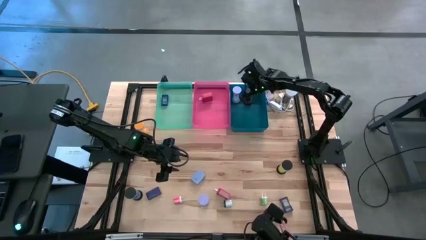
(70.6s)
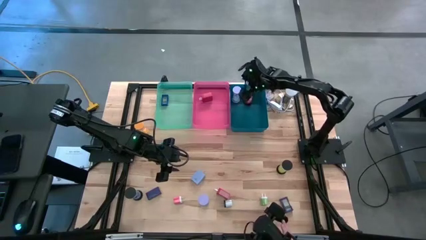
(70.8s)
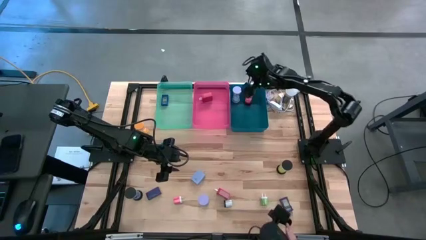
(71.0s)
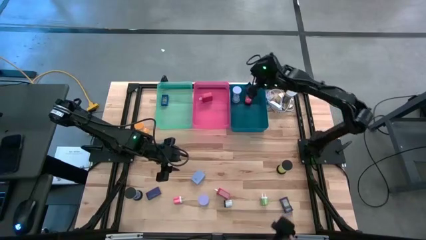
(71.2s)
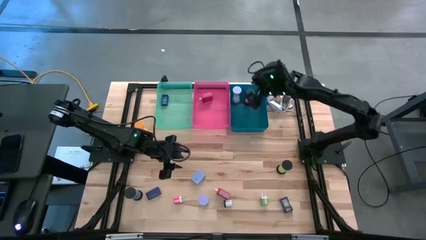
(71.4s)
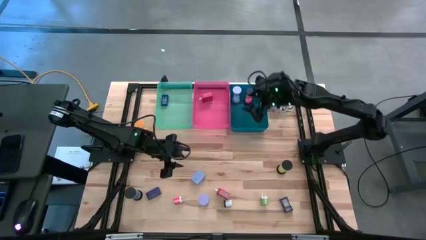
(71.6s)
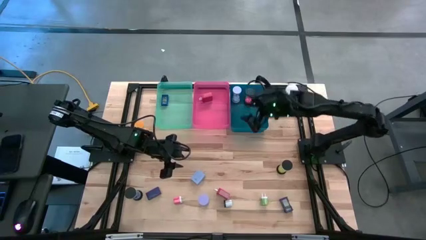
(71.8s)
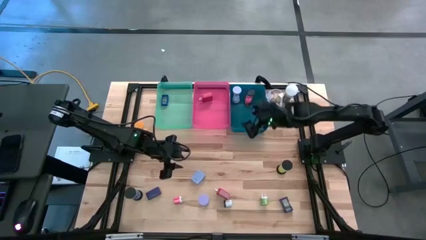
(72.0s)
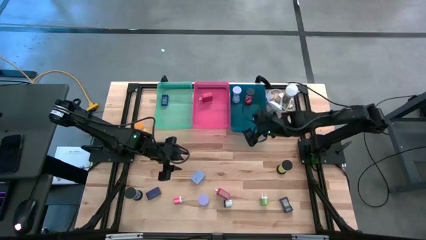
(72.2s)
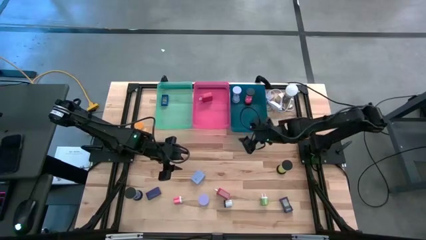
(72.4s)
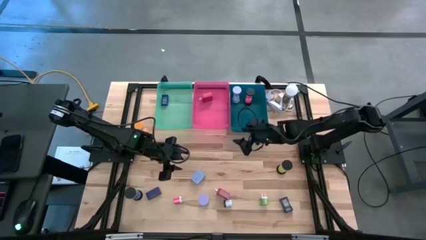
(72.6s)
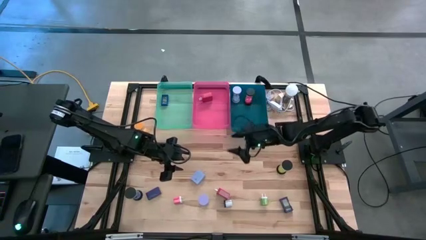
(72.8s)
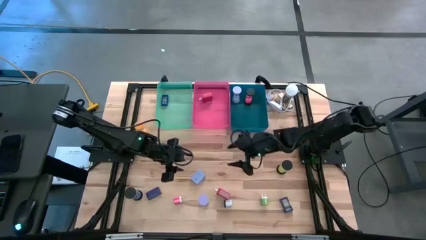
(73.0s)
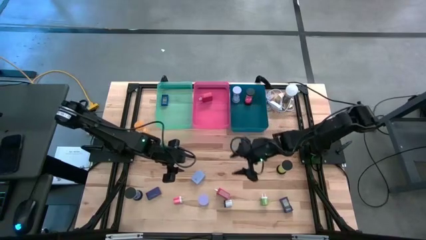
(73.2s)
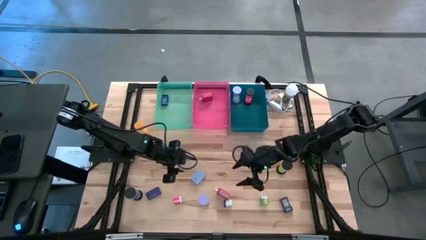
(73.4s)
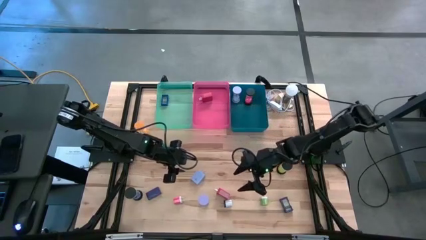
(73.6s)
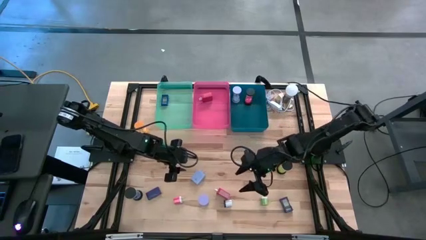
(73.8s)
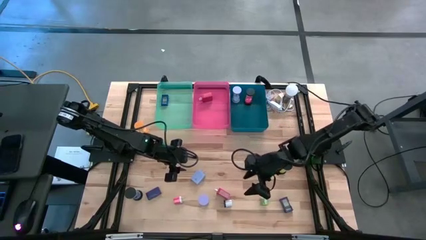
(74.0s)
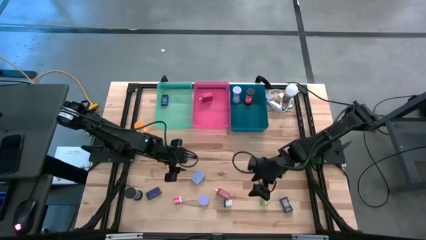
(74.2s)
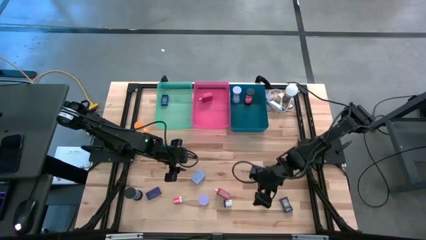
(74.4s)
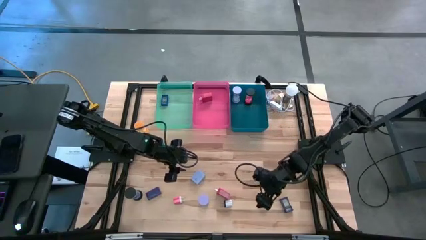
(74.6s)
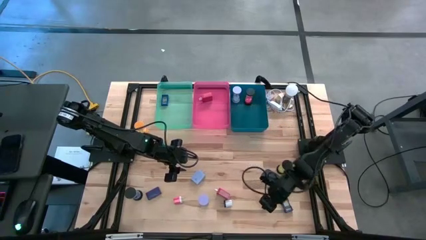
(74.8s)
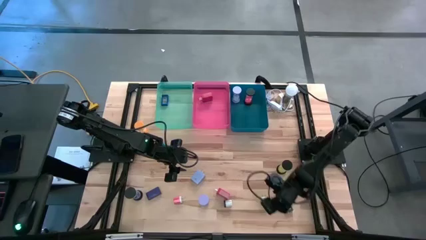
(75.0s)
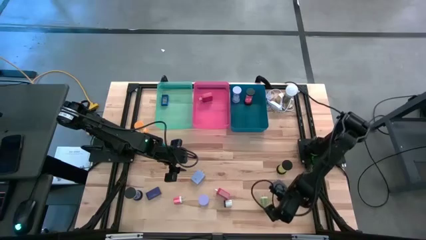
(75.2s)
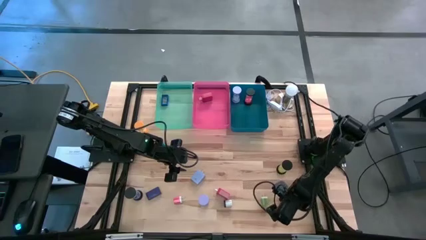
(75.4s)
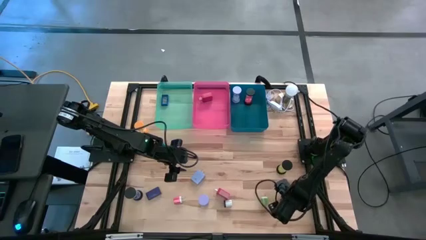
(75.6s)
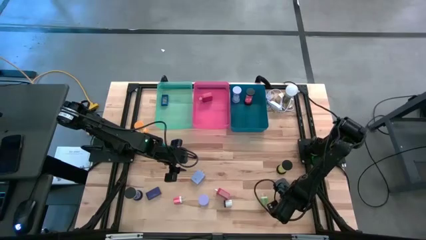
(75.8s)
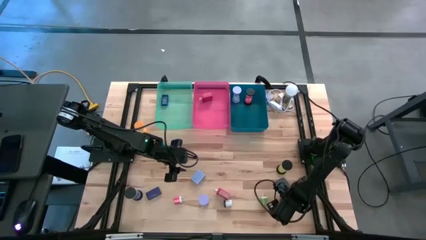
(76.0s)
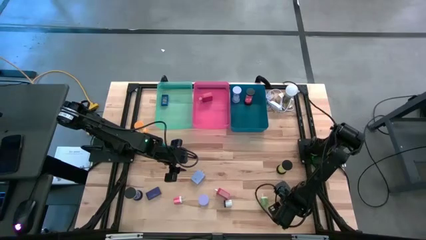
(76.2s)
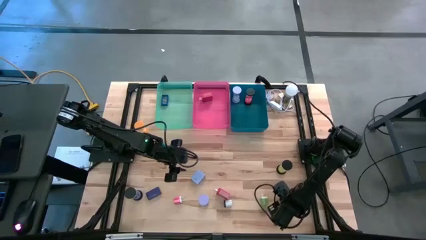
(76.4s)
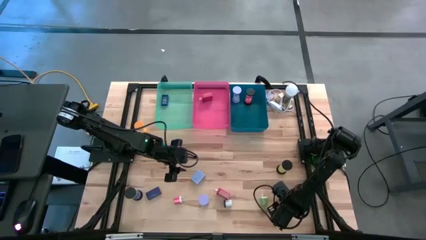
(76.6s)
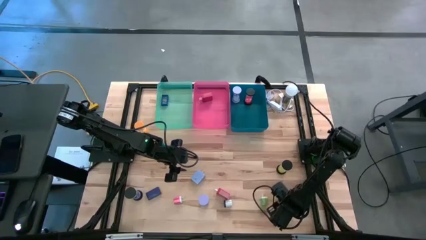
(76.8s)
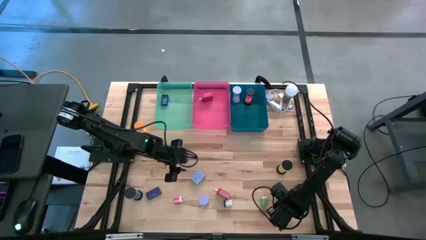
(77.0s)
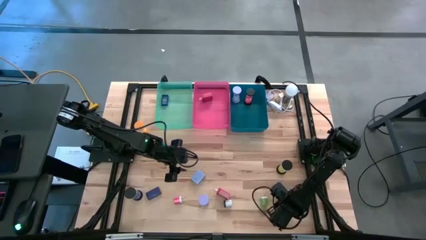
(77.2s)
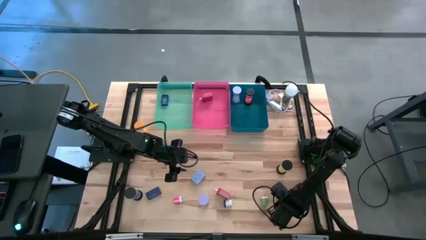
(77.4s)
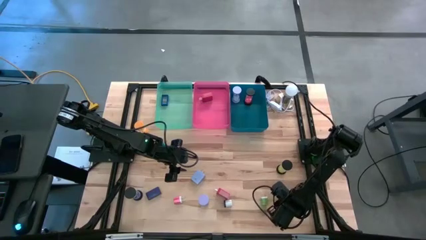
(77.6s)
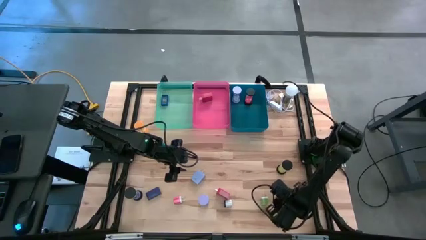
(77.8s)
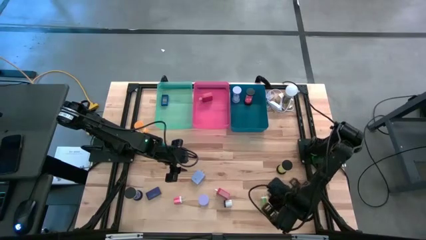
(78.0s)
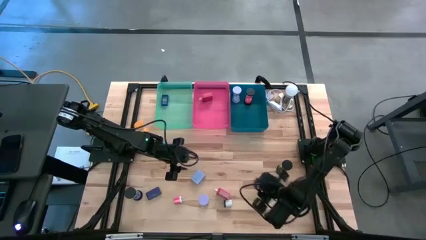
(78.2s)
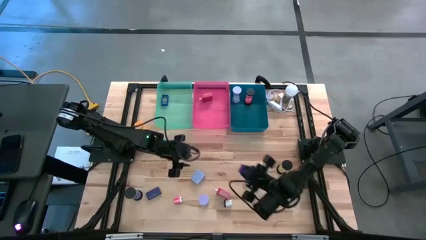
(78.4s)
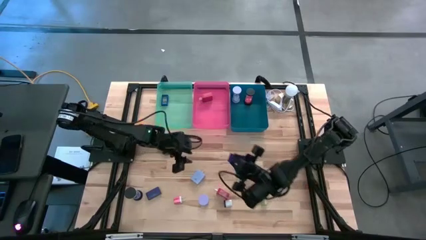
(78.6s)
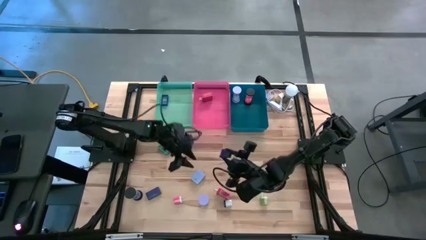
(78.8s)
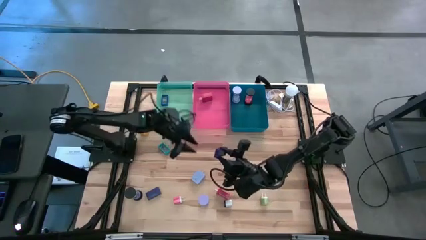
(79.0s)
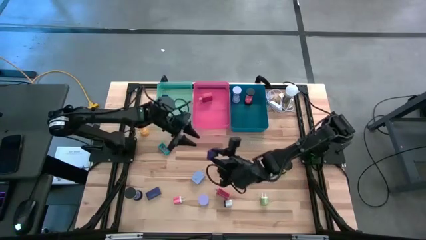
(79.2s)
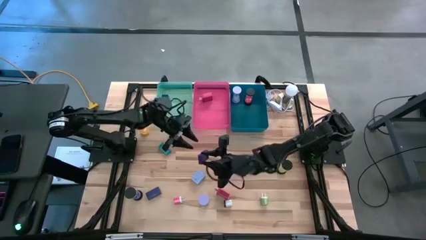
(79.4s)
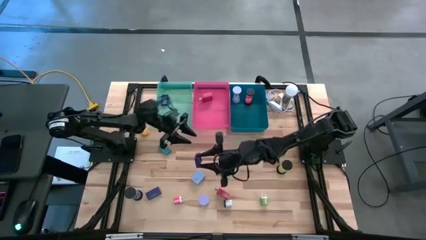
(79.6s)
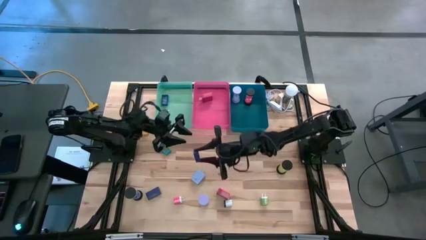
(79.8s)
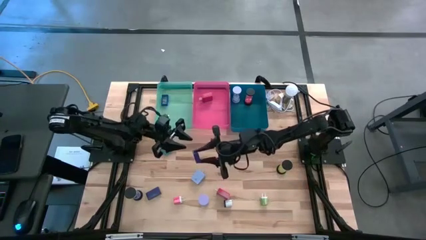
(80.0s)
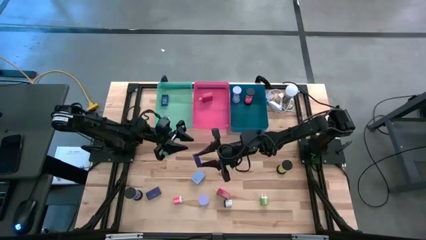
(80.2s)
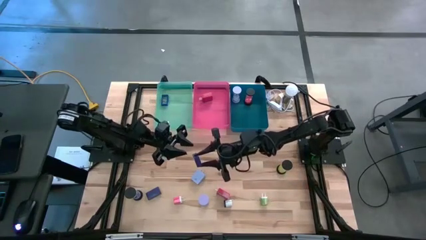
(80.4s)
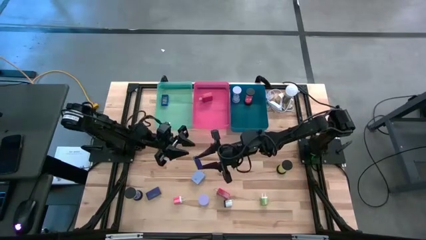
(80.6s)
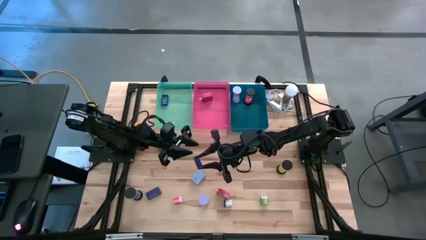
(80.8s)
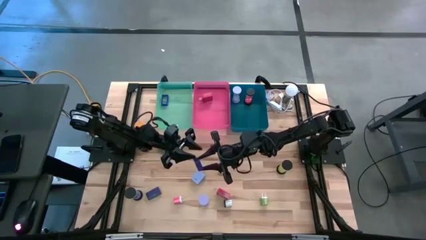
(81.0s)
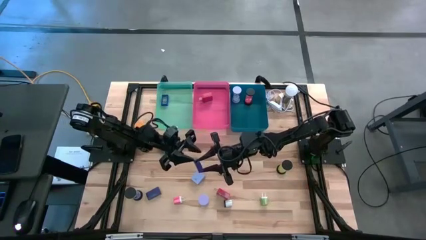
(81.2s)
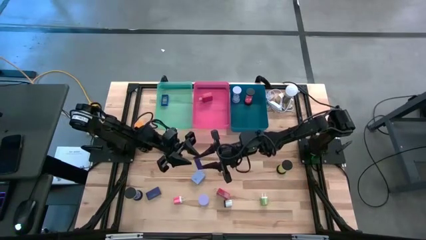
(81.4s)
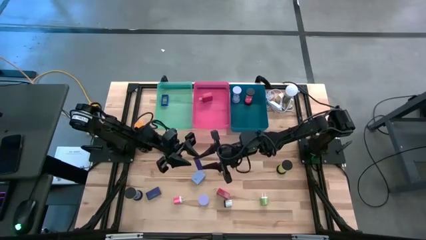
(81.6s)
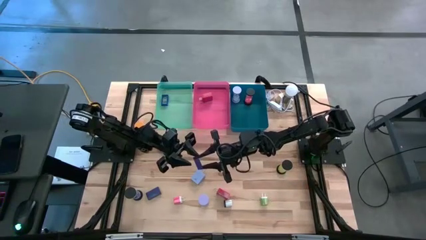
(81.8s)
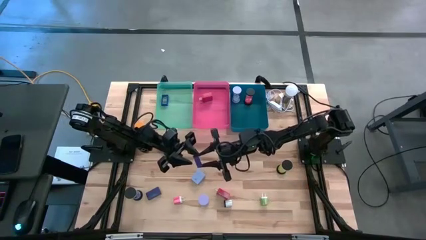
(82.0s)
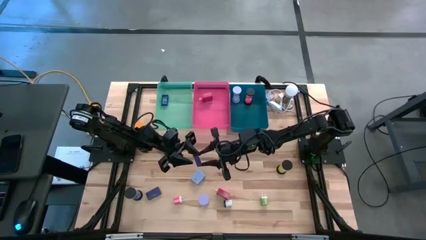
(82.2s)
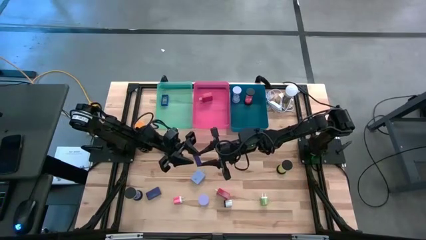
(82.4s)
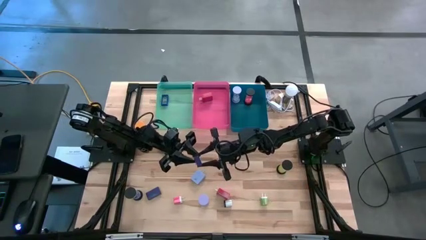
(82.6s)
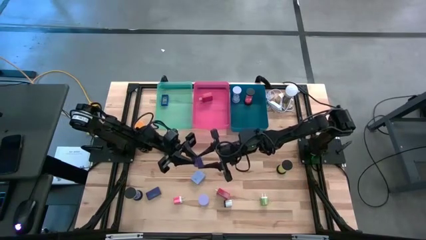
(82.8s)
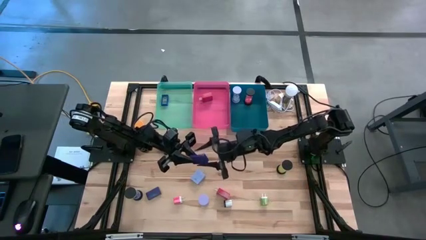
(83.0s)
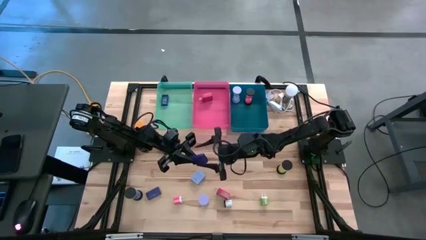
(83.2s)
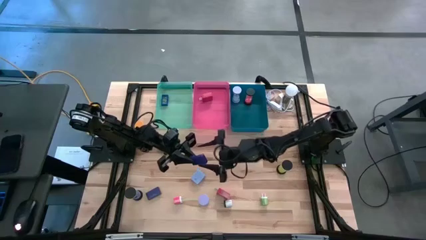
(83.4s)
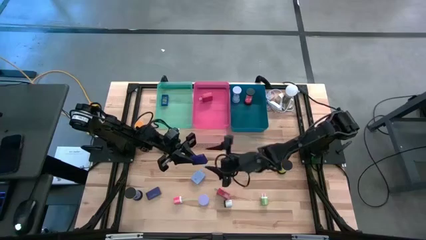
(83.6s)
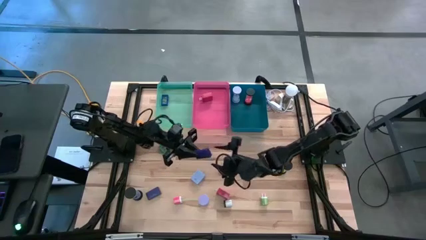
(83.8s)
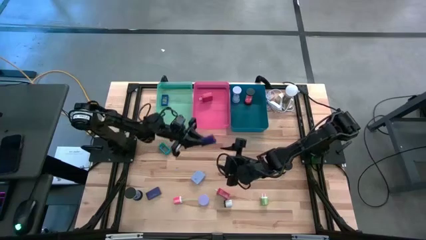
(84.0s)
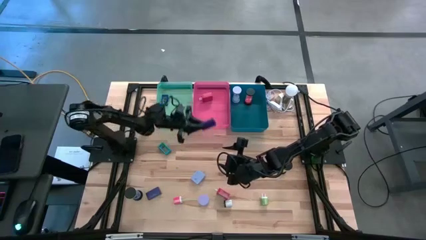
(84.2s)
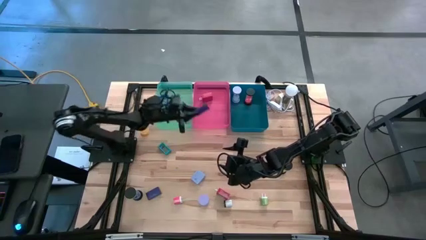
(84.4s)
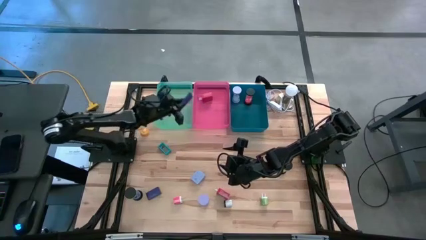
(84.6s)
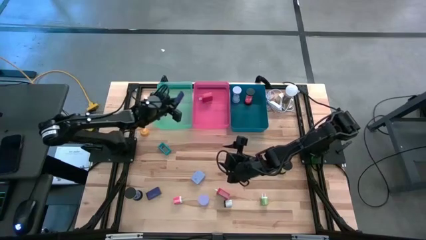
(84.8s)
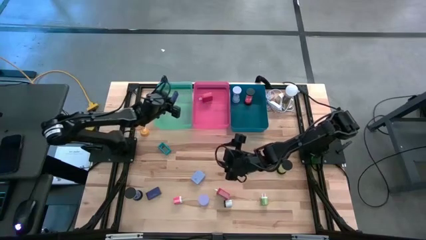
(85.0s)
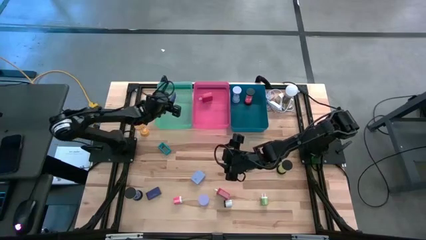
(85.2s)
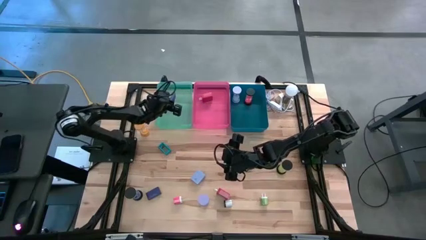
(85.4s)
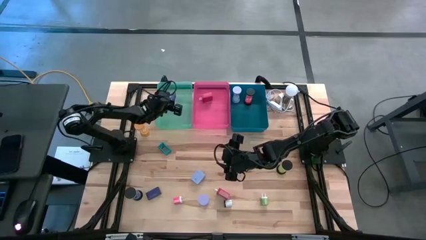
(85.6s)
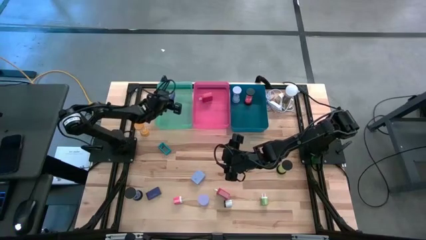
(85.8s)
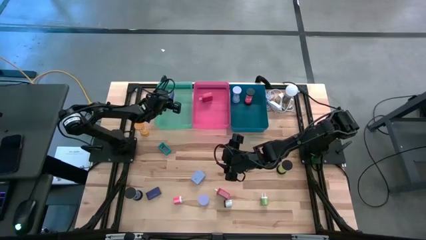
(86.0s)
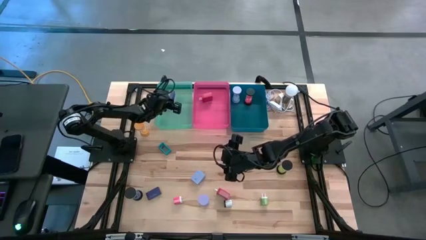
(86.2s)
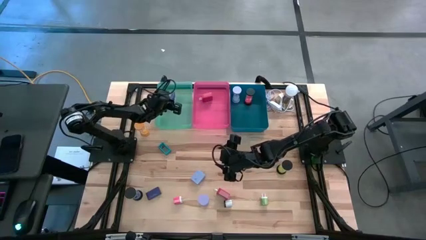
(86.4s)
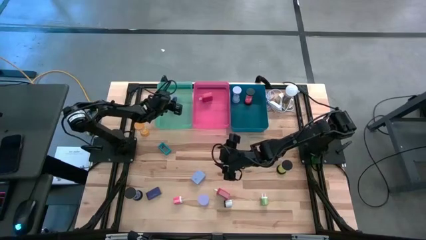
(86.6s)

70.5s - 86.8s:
Task: Pick & Place Office items
Put the violet digital clock into the light blue bin

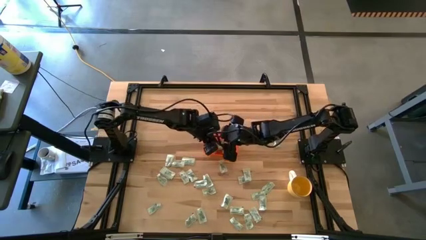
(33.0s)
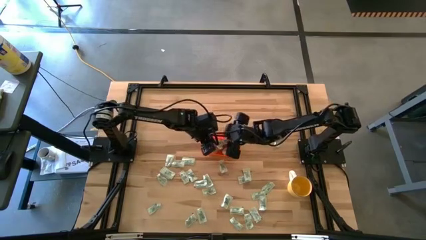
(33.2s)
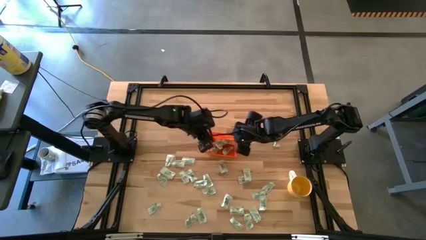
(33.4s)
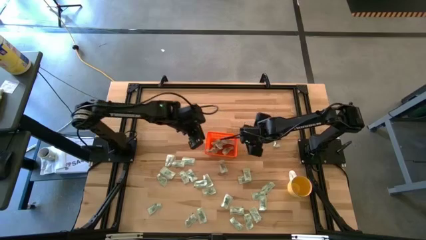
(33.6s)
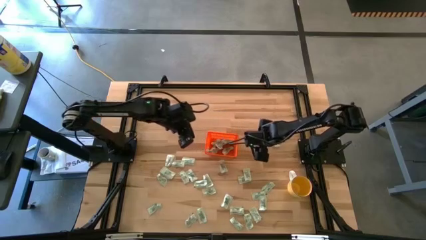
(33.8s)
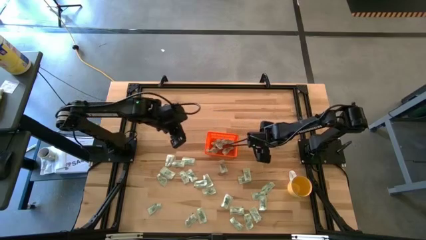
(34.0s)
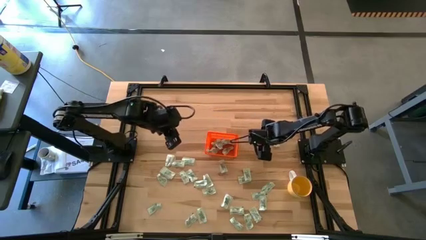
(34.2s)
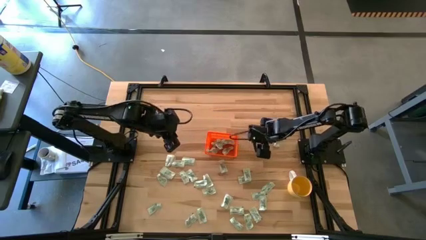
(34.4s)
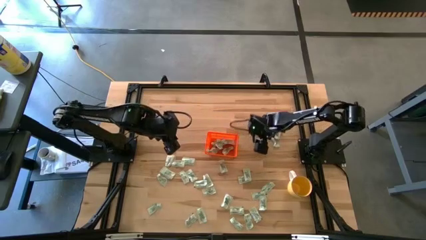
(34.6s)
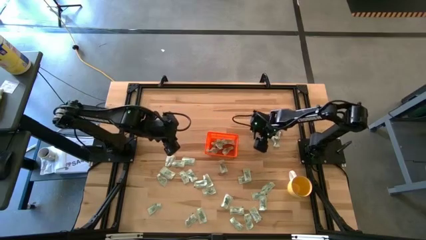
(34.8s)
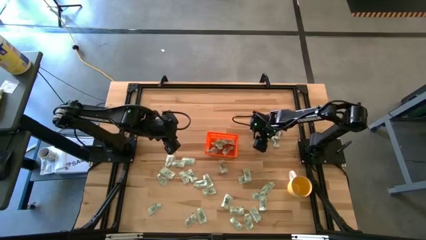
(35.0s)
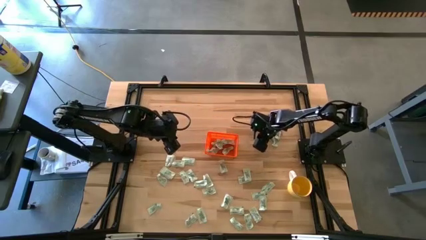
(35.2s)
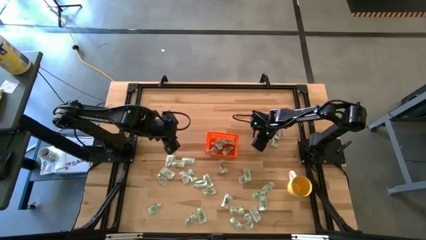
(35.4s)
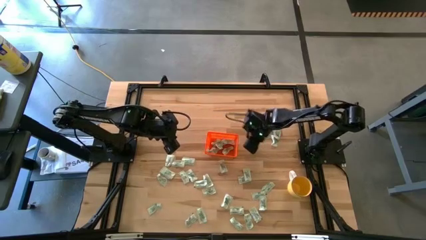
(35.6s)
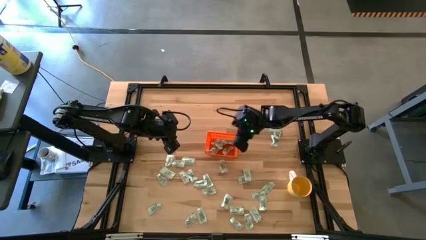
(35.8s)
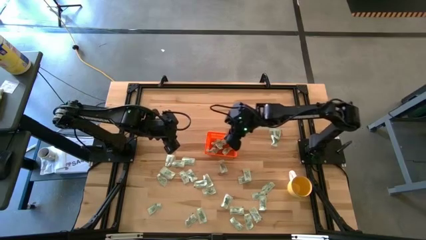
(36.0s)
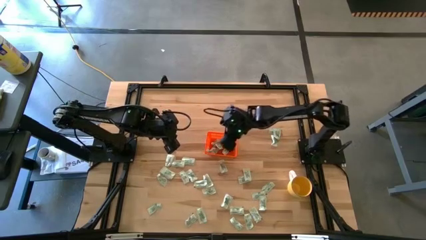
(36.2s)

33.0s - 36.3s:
Task: Pick and place Stevia / Truvia into bins
Put the light green stevia packet into the orange bin
